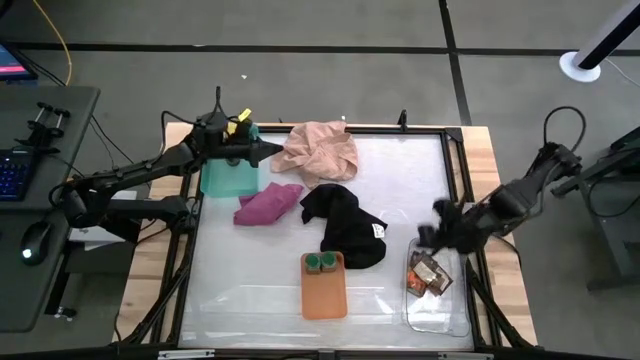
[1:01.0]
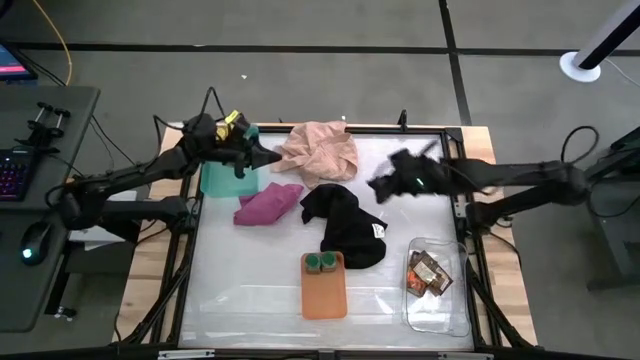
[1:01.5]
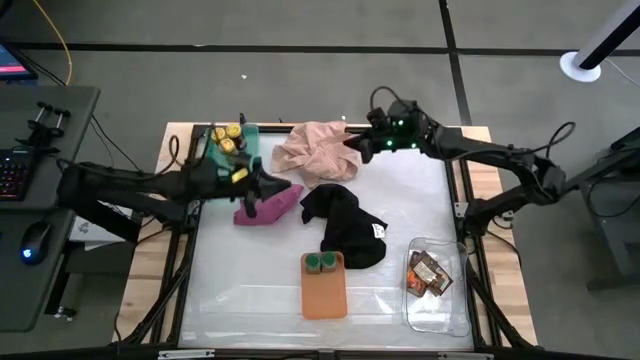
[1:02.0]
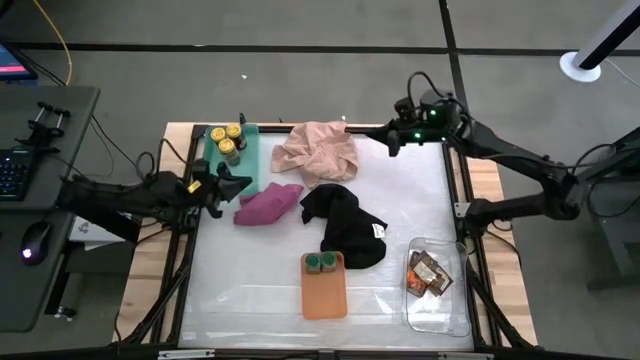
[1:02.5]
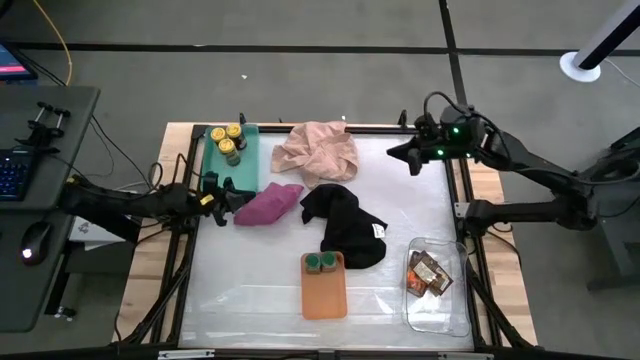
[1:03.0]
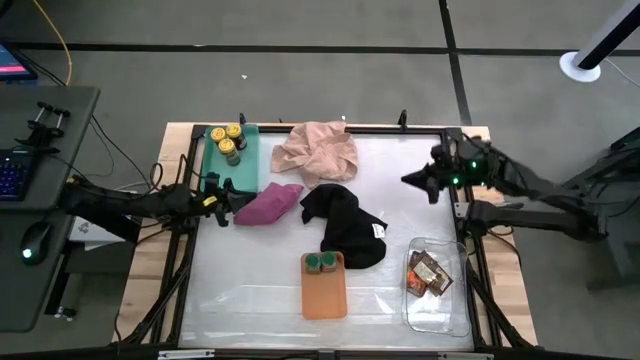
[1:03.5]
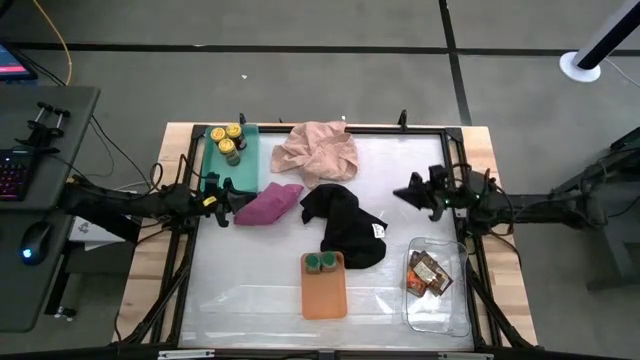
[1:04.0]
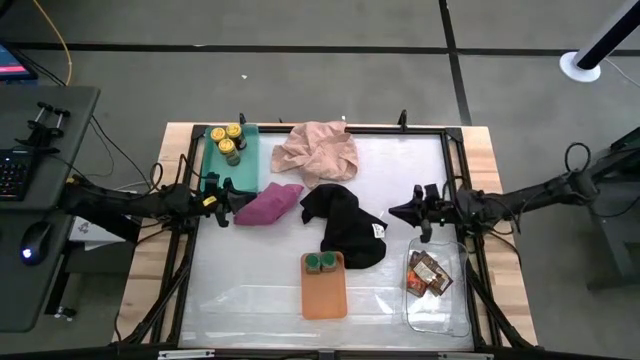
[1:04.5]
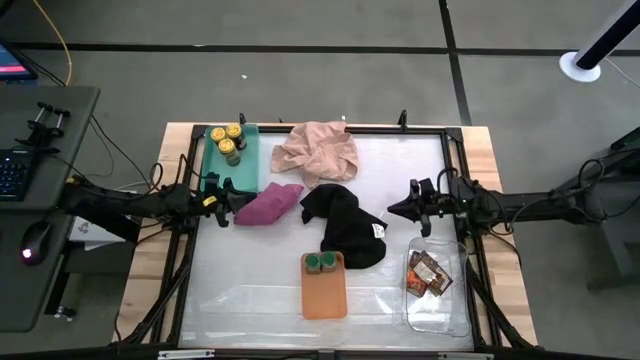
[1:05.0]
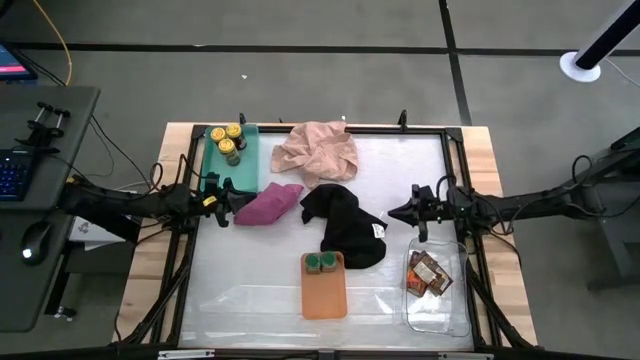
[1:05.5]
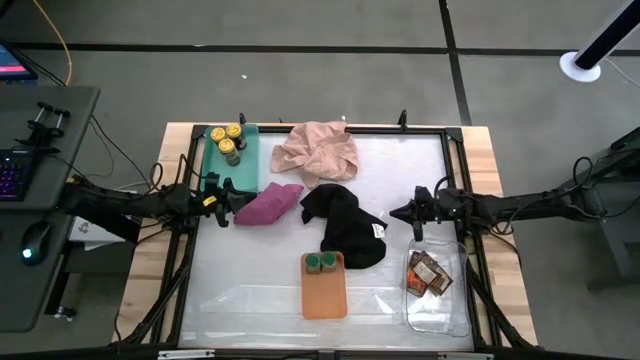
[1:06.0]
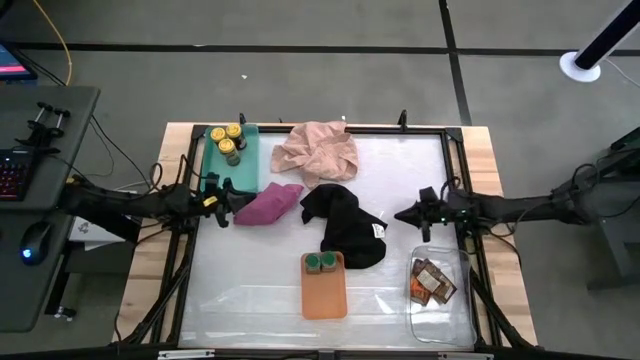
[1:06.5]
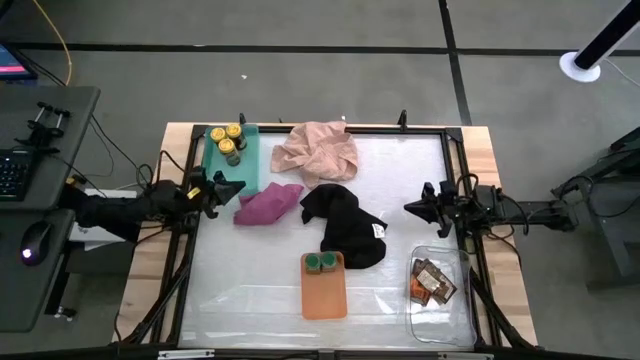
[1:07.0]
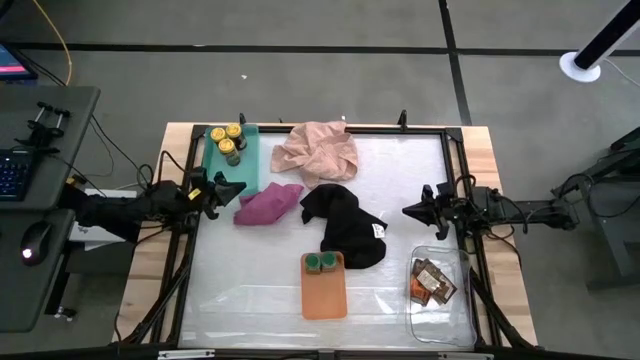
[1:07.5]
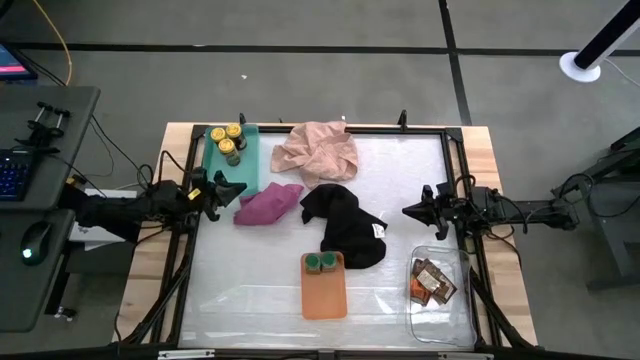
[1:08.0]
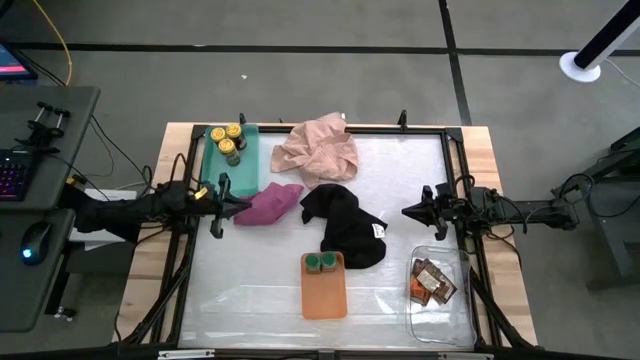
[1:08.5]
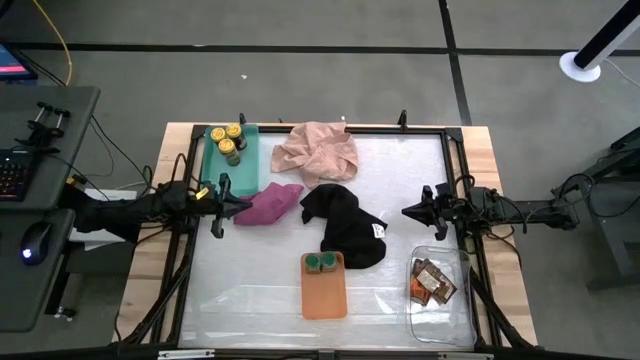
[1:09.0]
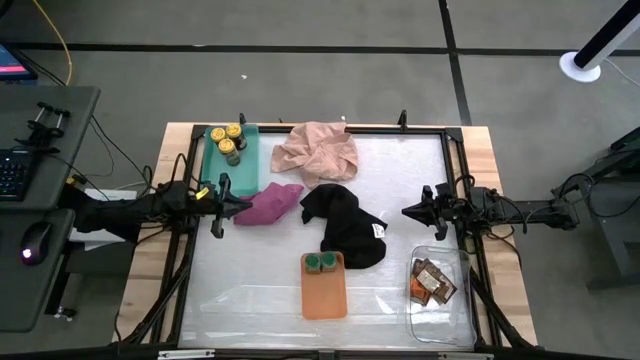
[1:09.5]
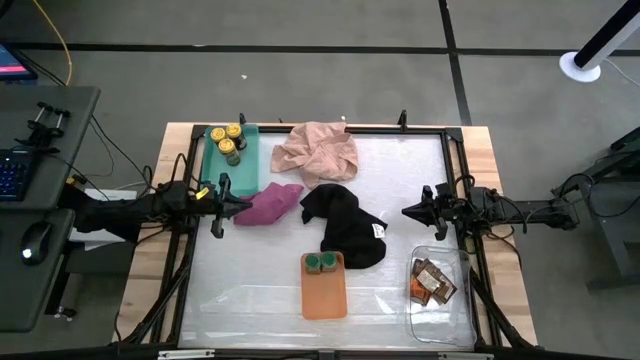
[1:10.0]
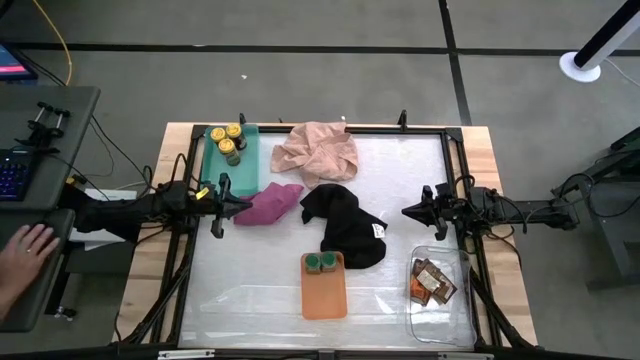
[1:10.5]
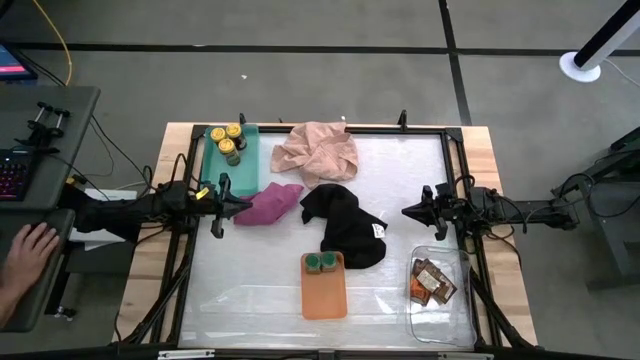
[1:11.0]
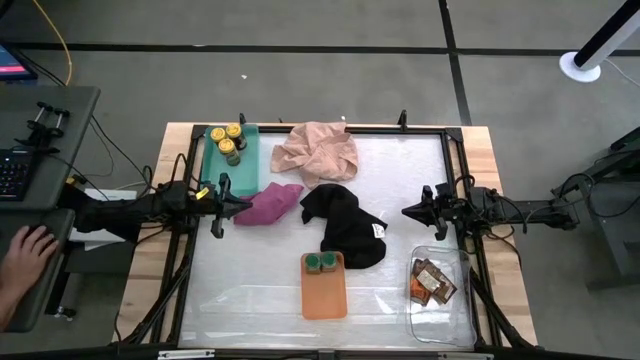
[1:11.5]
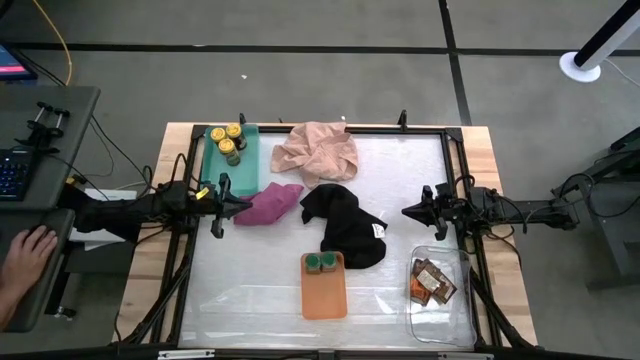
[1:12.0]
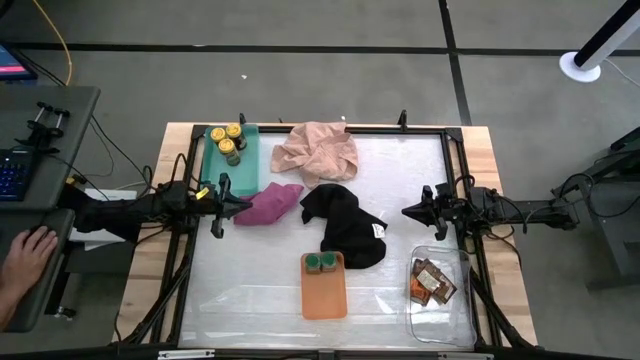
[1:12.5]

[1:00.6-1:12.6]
Task: Sort spices by type
Return to Home Position

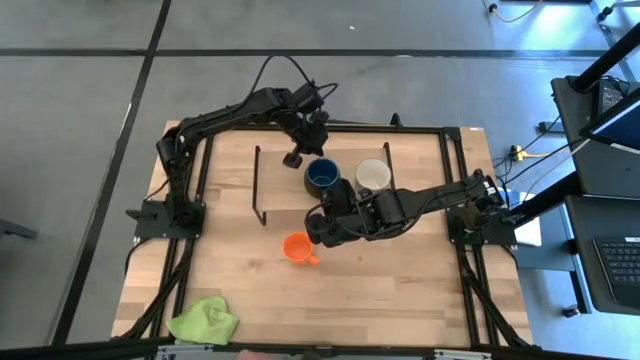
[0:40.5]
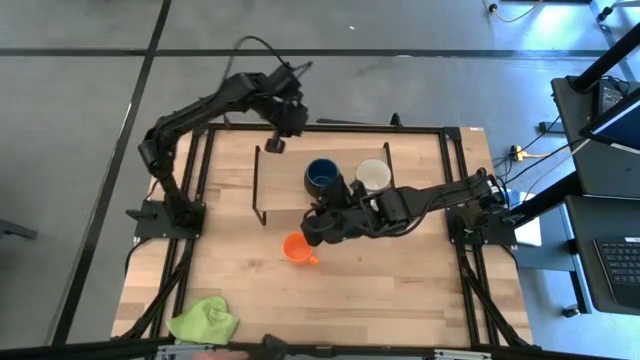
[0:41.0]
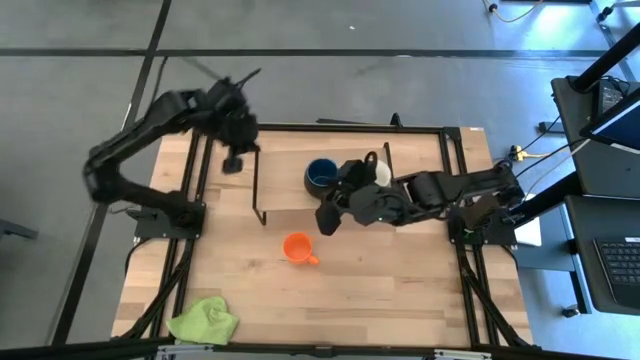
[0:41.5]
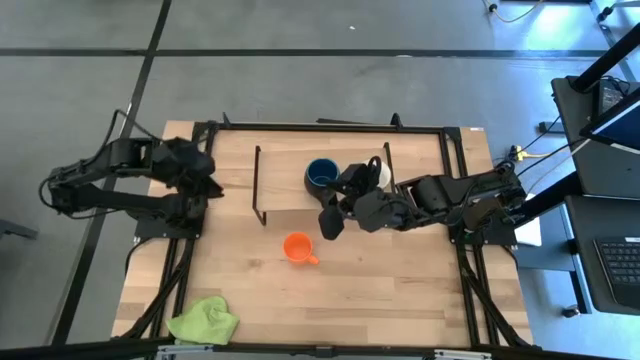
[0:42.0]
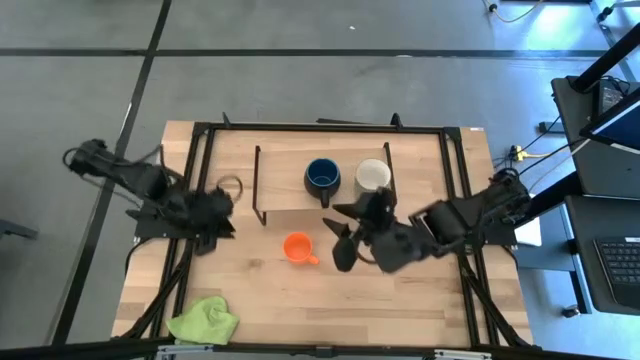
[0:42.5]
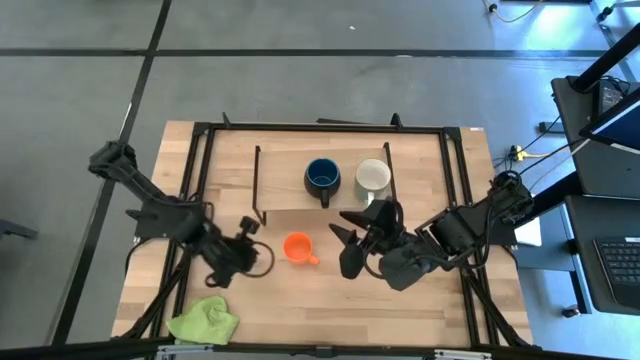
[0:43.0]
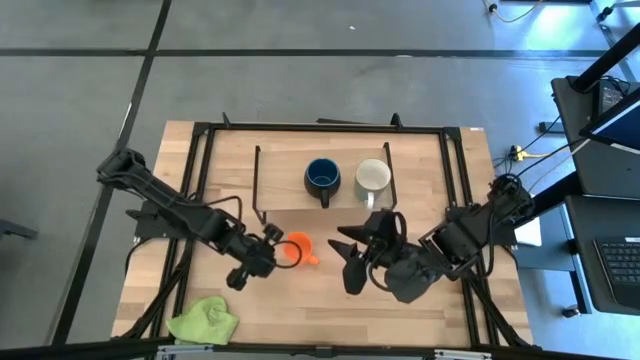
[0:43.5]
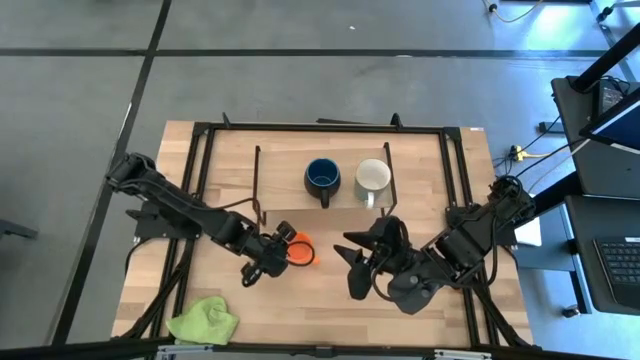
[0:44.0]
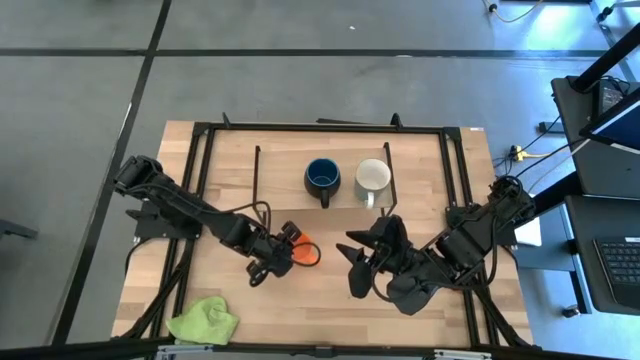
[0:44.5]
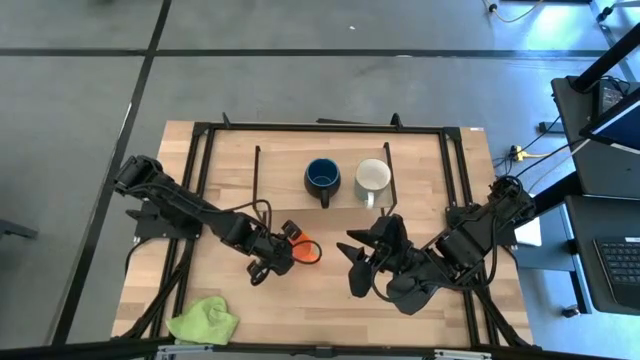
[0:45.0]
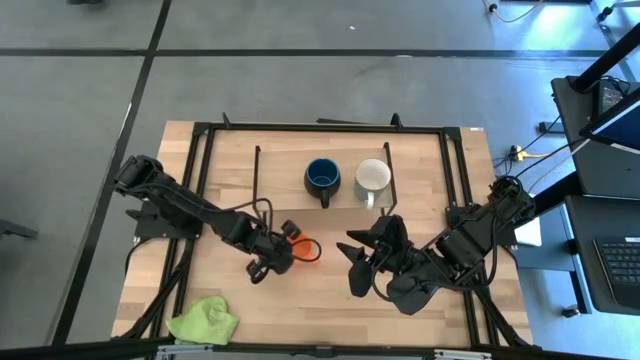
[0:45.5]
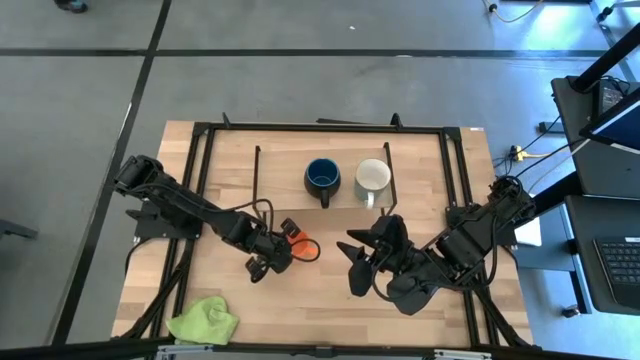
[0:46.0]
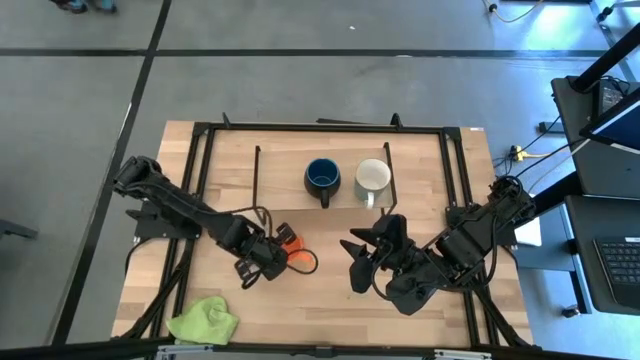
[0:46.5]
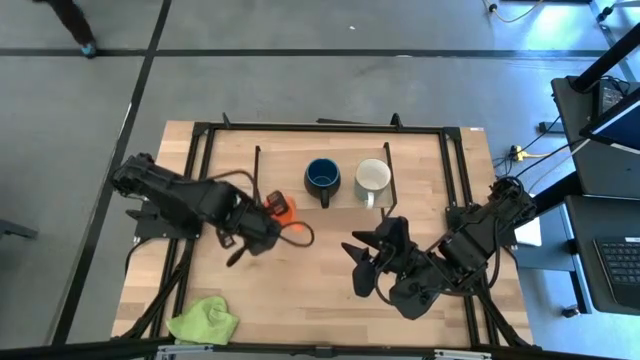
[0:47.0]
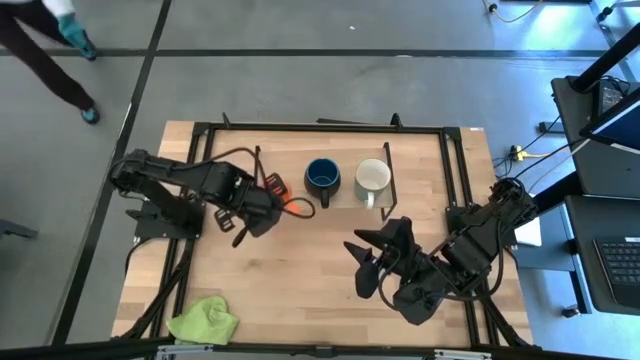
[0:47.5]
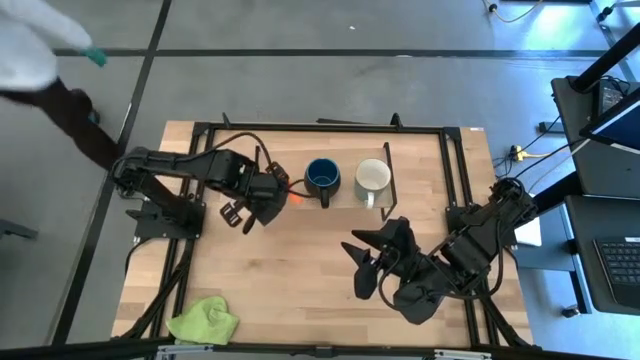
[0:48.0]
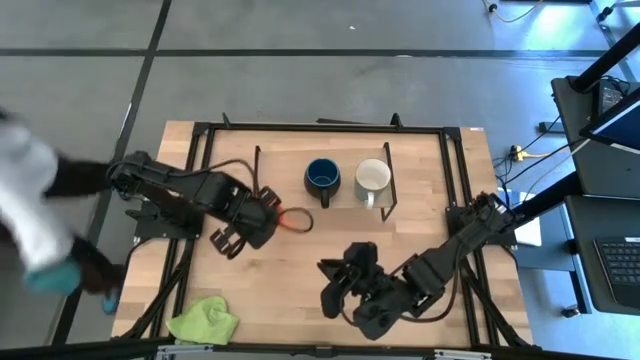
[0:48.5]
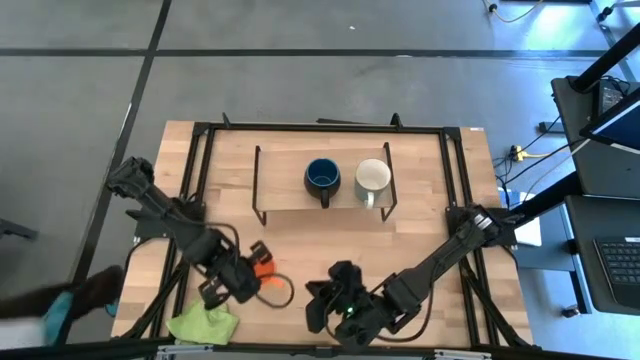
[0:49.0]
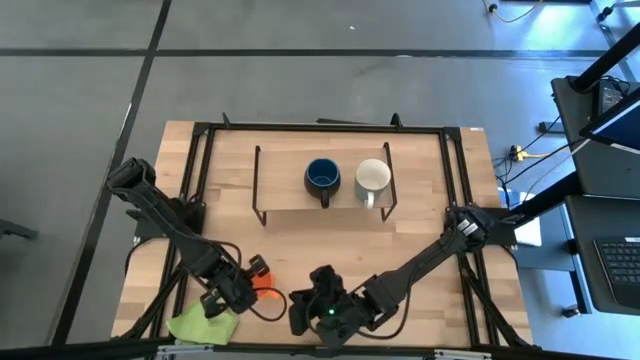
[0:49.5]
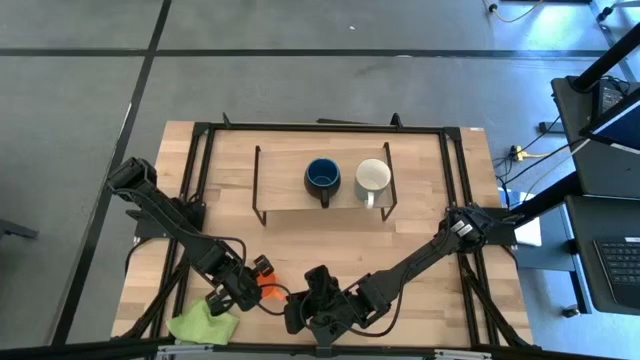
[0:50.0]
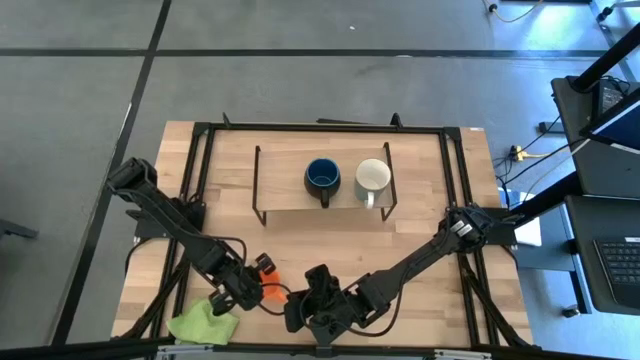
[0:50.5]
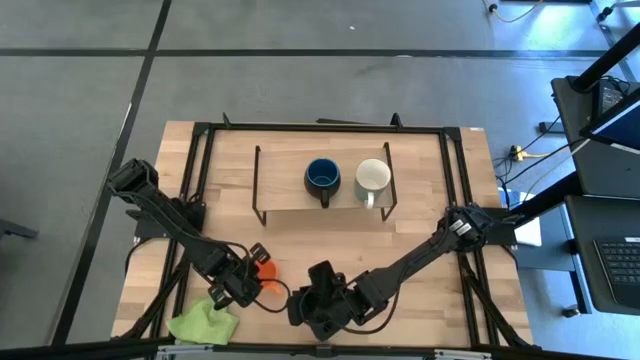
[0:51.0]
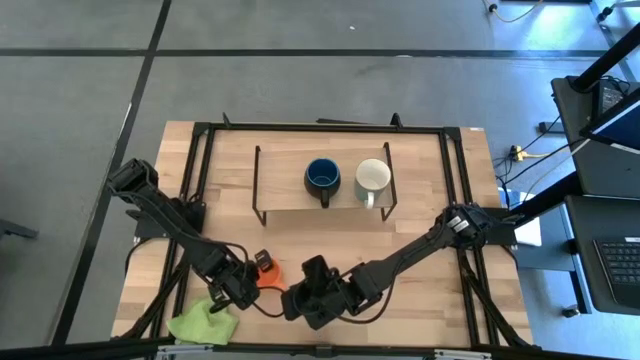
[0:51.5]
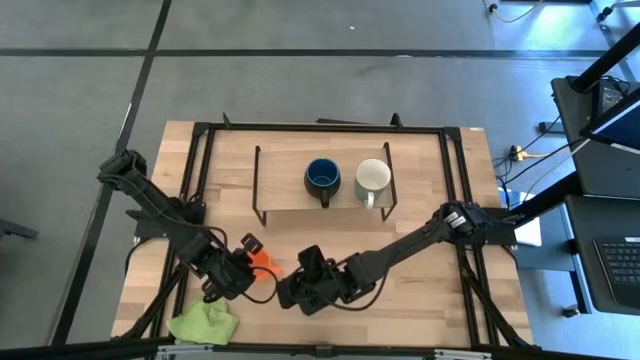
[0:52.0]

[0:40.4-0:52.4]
Task: Stack small to large cups/mugs on shelf
Put the orange mug on the shelf
